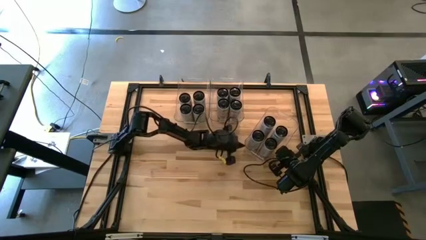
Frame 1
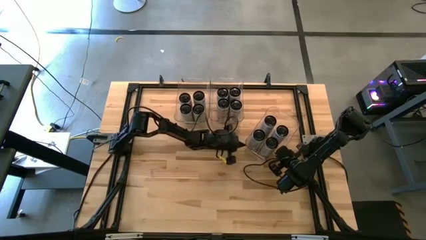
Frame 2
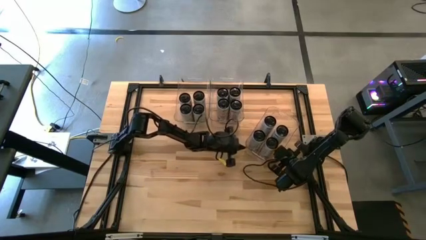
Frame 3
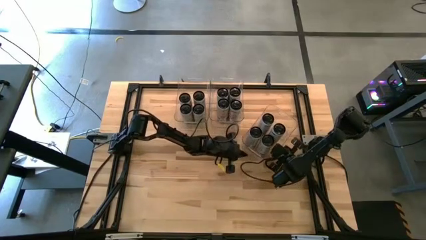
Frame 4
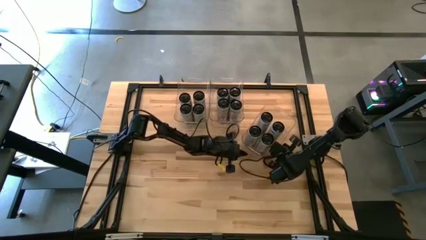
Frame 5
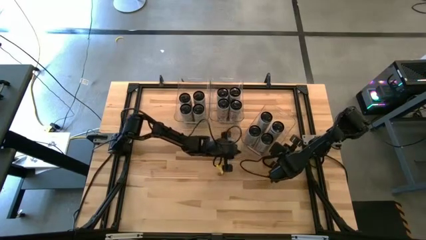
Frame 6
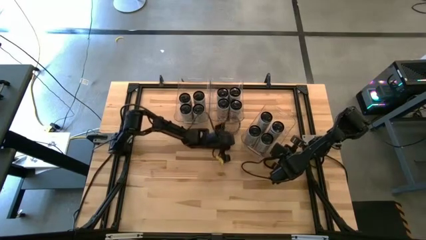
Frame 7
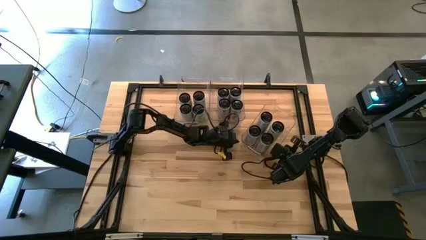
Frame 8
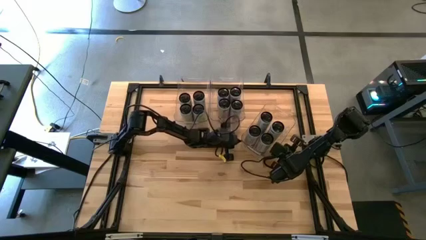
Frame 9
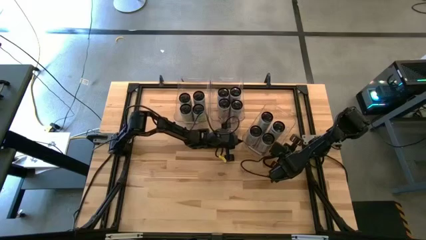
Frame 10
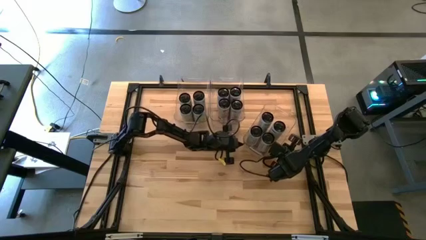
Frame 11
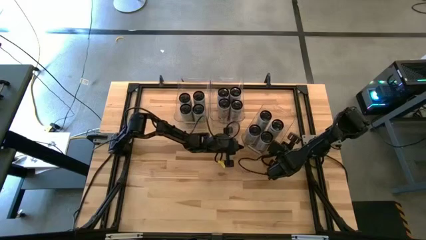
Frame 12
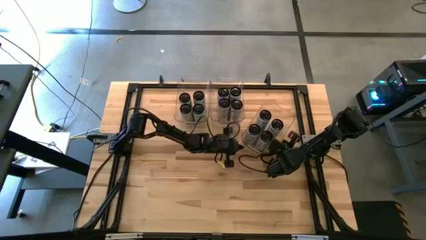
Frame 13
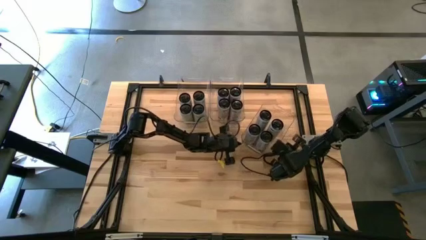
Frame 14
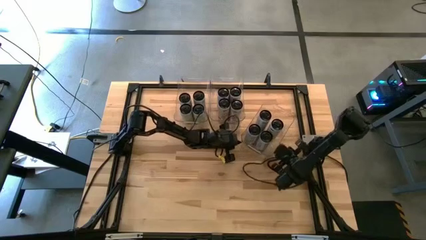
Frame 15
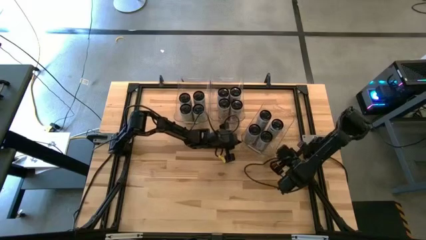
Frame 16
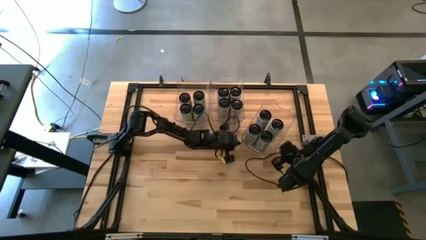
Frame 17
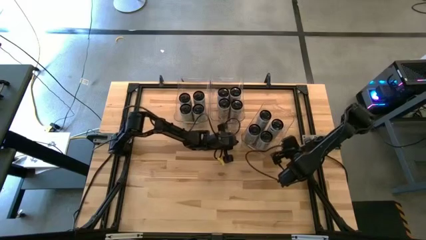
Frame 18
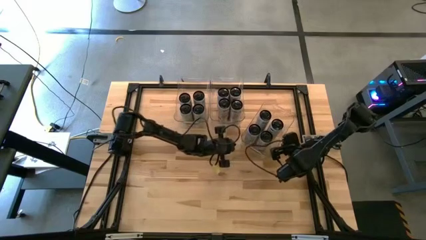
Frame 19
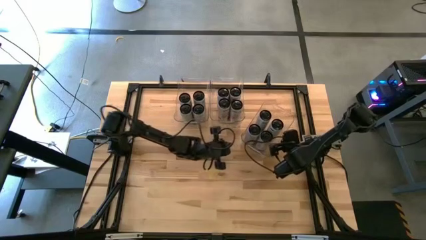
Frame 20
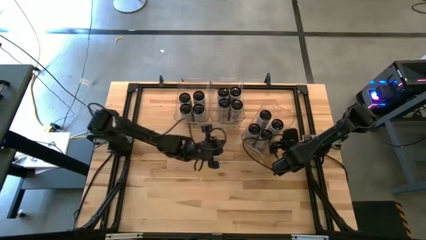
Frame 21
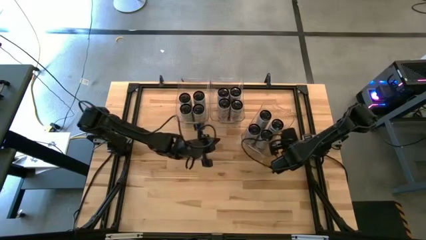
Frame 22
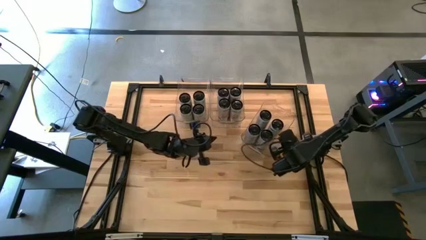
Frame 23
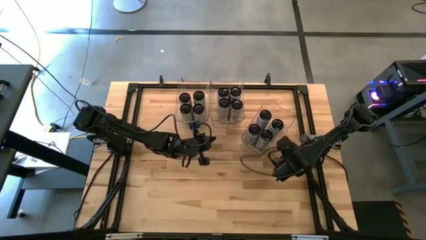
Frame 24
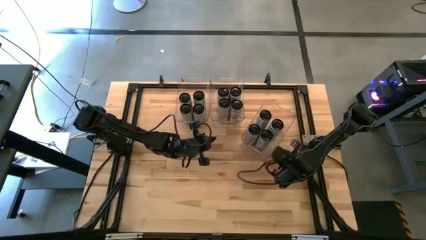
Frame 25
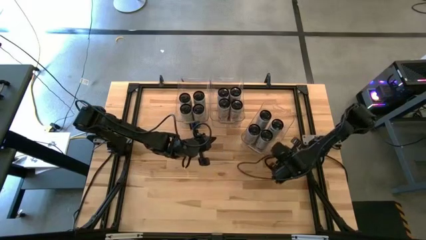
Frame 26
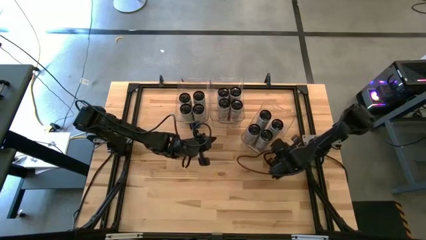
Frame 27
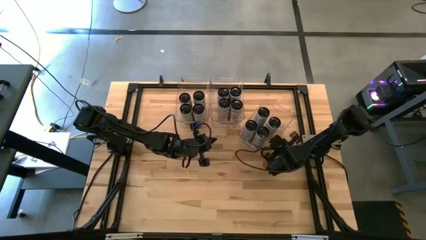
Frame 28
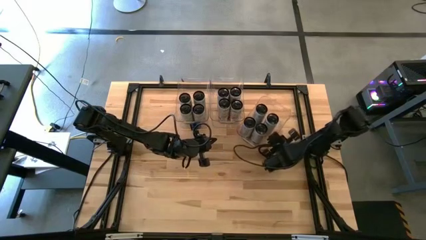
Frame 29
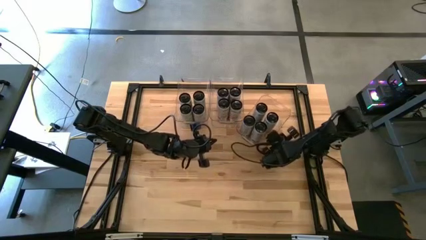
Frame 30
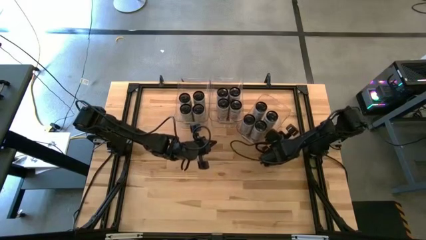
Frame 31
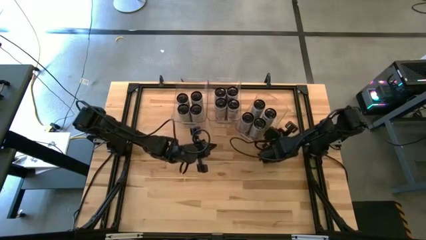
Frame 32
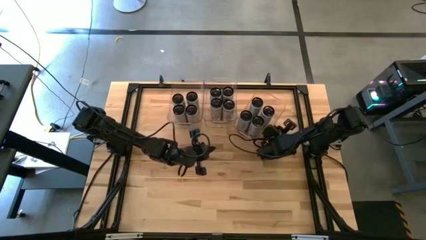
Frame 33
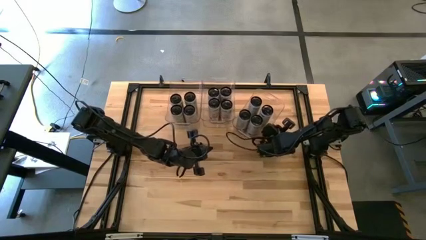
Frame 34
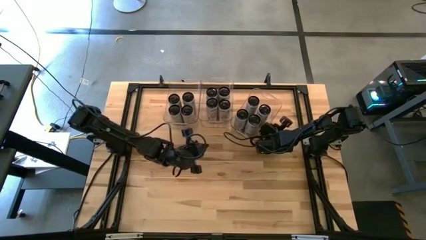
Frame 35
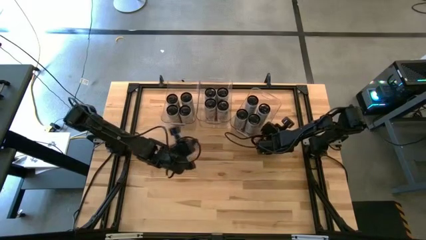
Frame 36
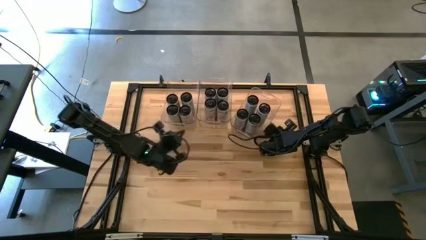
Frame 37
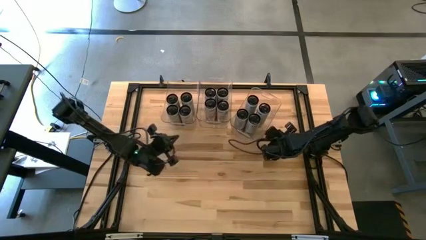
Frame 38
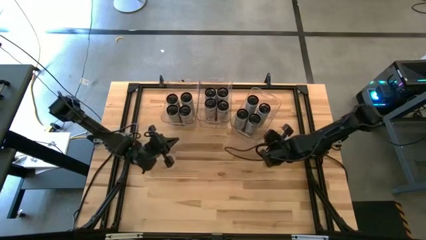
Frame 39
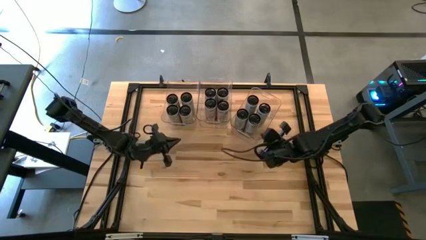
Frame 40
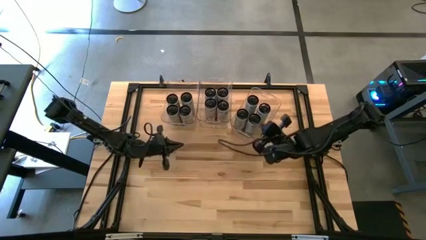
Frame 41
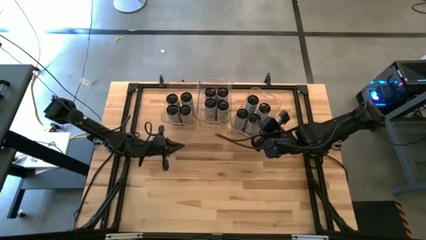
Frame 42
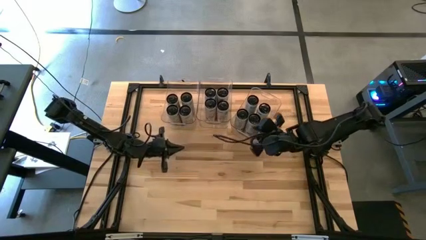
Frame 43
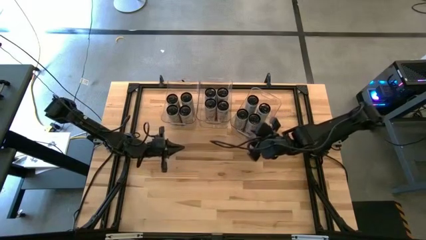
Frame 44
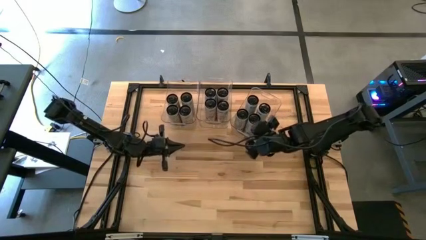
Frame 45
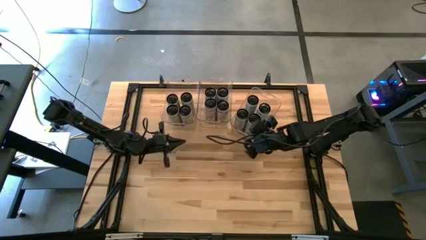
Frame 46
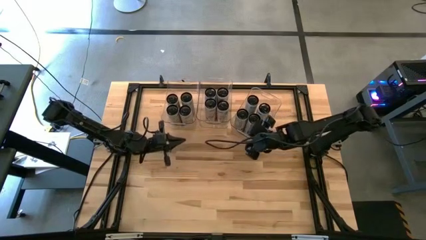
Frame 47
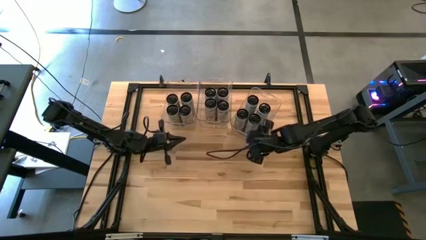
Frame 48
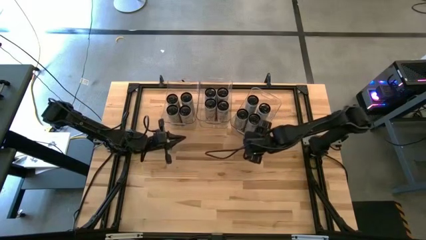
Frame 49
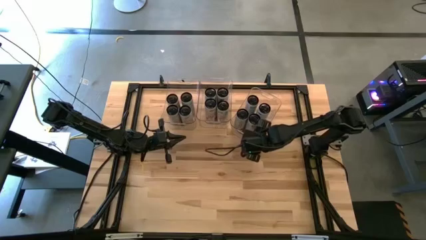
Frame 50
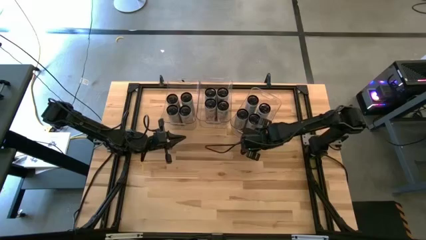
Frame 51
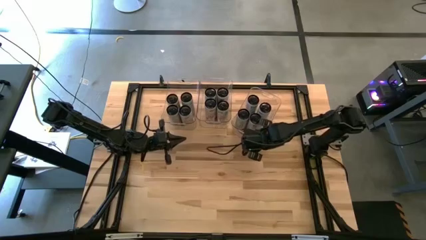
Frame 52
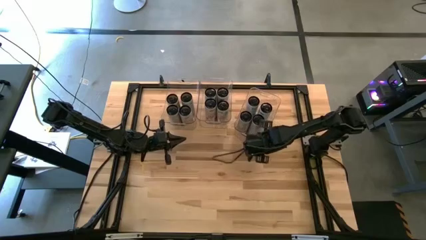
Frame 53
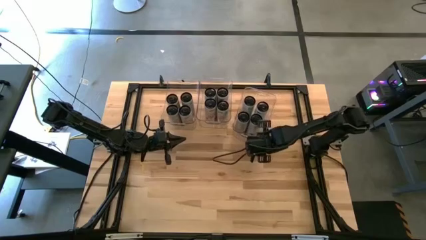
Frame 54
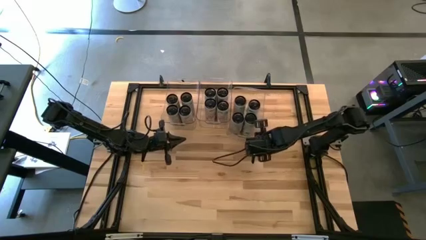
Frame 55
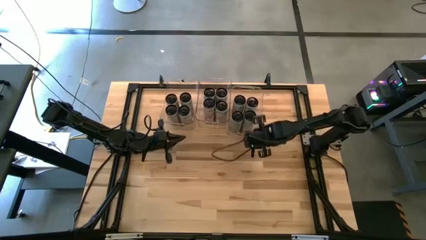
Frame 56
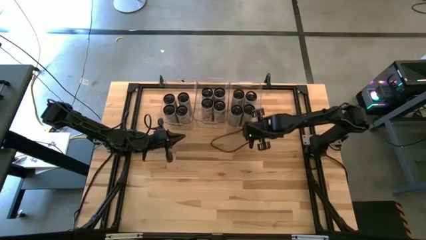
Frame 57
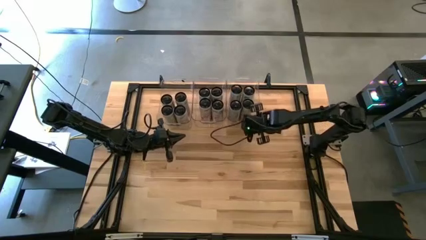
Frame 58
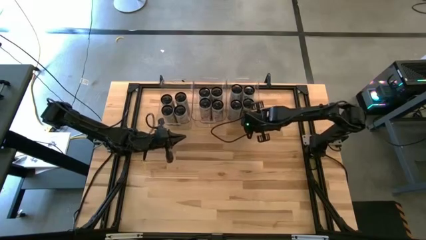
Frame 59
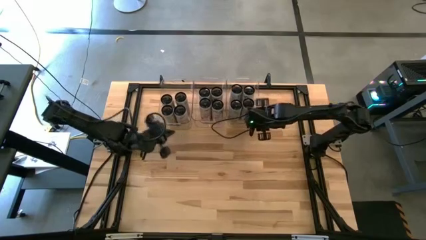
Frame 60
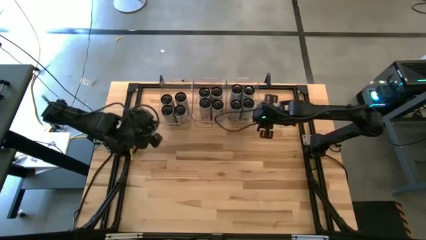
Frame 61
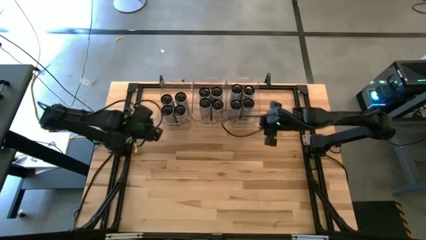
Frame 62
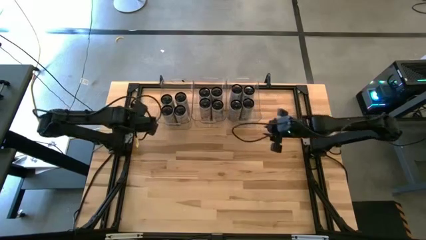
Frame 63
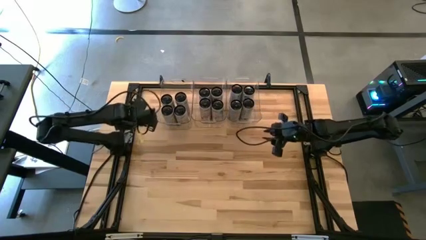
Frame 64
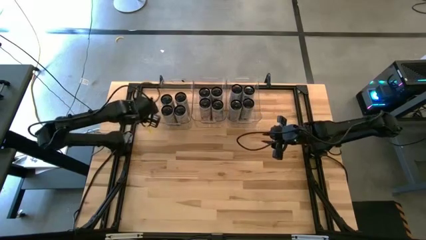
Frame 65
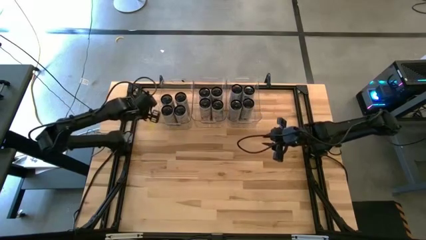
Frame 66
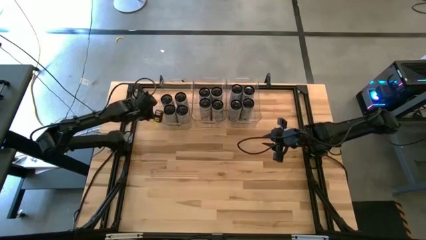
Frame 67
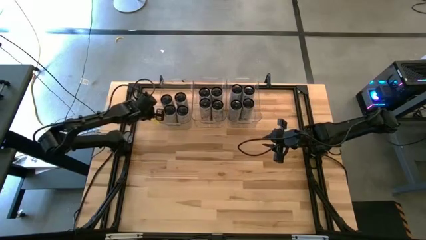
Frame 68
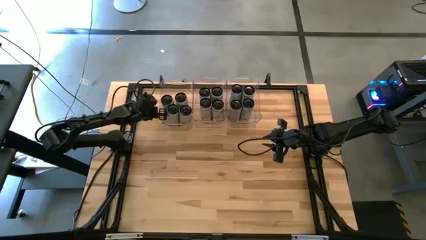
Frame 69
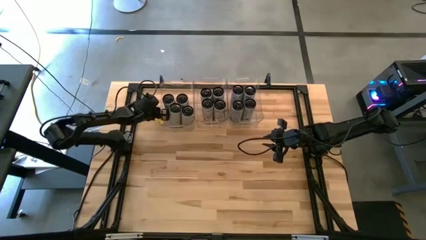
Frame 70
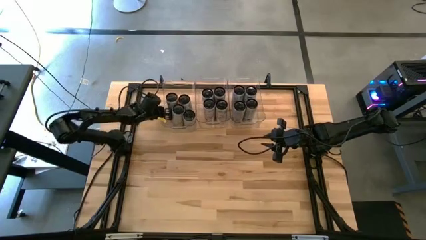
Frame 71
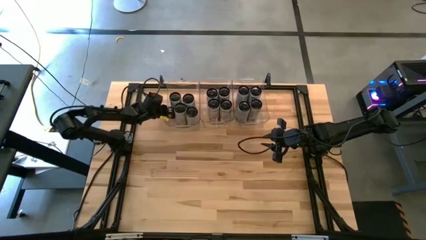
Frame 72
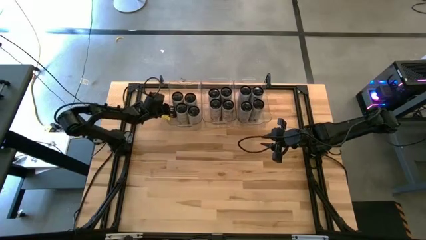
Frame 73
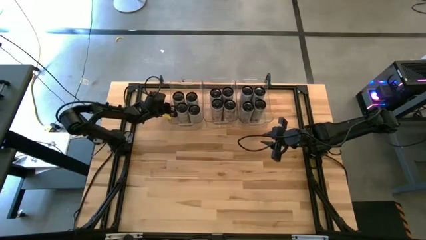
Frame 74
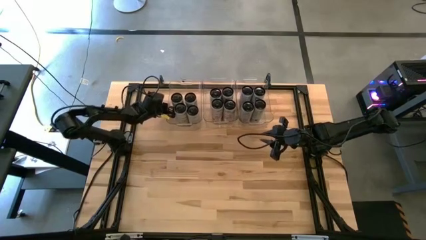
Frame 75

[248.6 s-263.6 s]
Task: Sort soda cans
Adjust all the transparent bins to the top of the table
